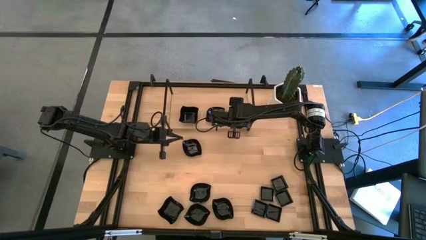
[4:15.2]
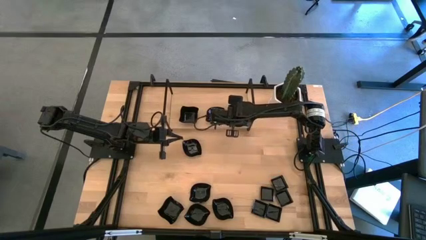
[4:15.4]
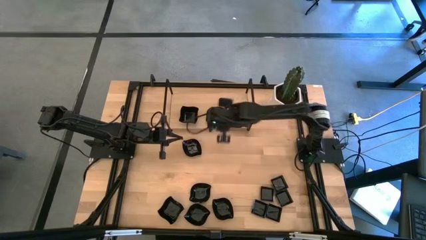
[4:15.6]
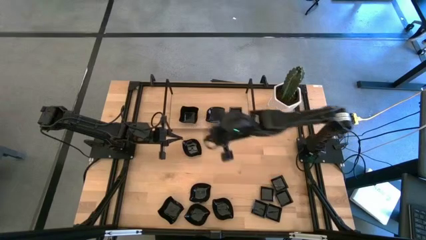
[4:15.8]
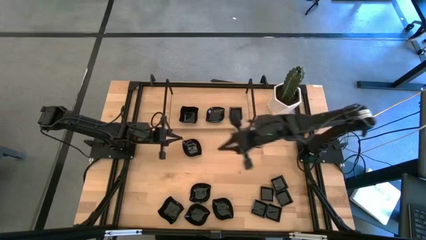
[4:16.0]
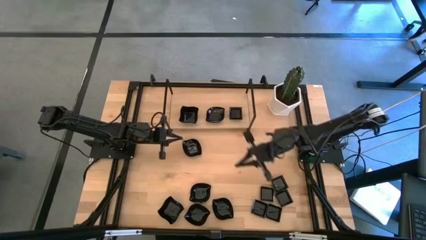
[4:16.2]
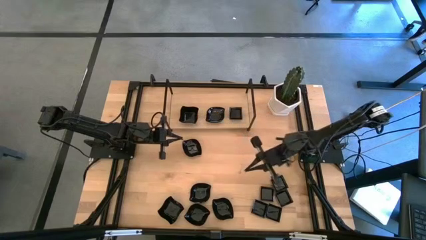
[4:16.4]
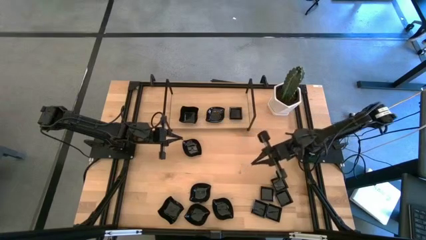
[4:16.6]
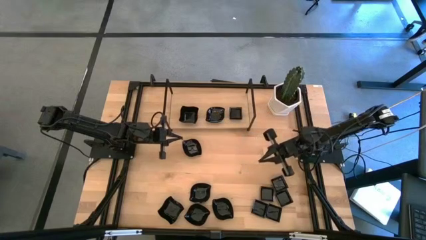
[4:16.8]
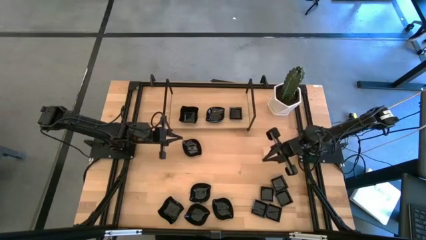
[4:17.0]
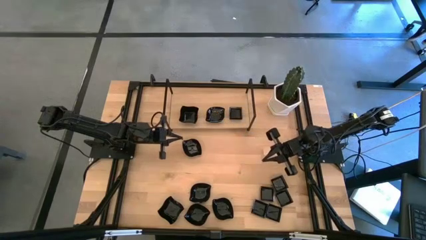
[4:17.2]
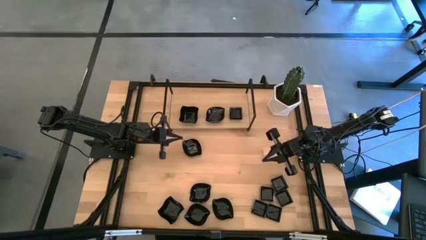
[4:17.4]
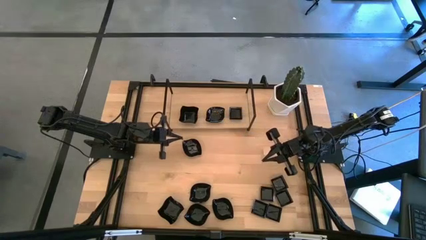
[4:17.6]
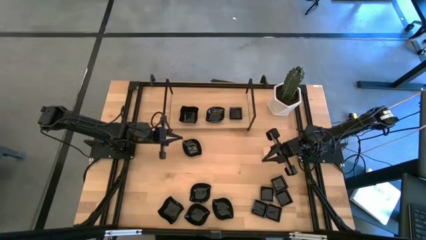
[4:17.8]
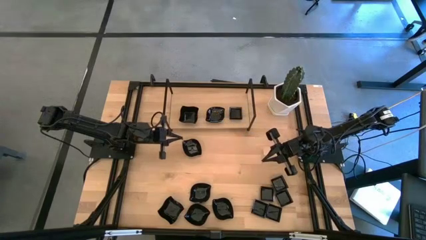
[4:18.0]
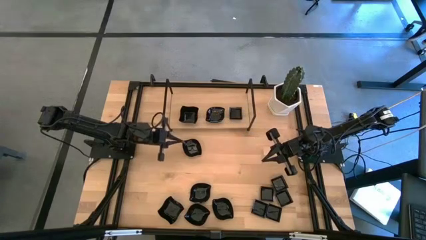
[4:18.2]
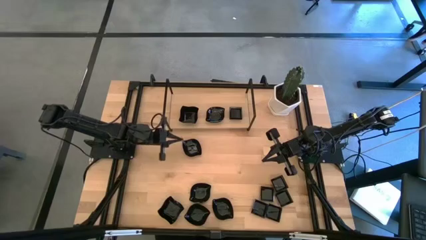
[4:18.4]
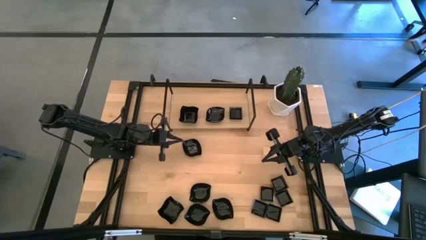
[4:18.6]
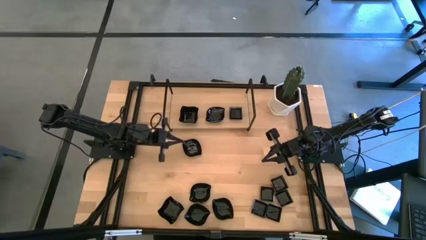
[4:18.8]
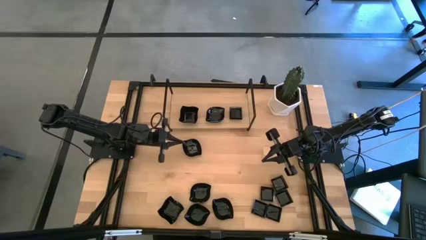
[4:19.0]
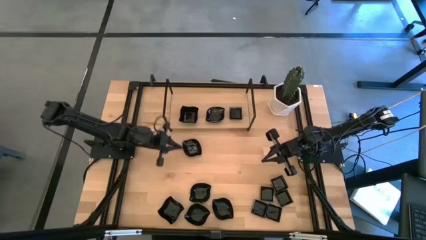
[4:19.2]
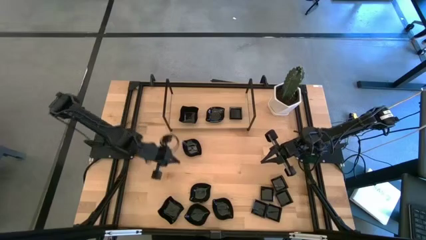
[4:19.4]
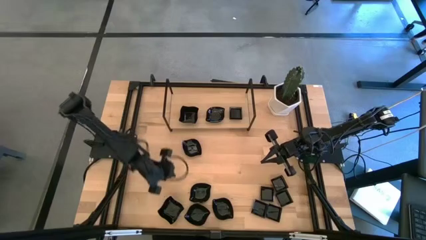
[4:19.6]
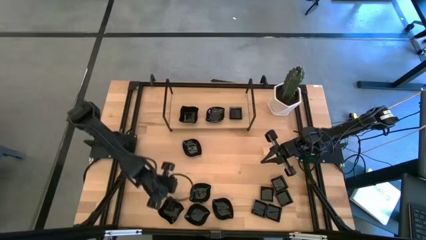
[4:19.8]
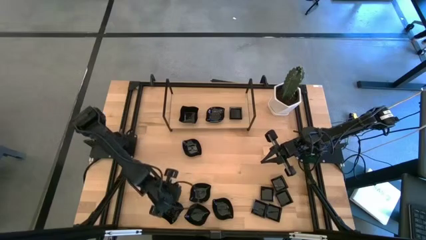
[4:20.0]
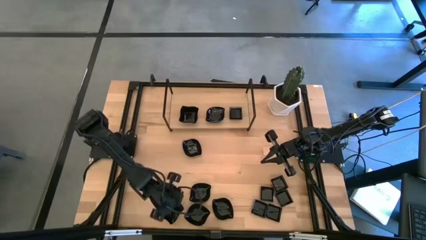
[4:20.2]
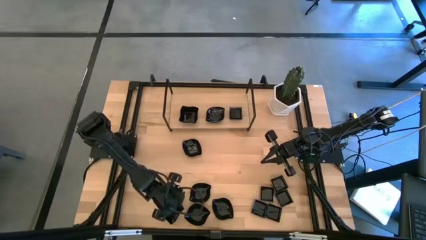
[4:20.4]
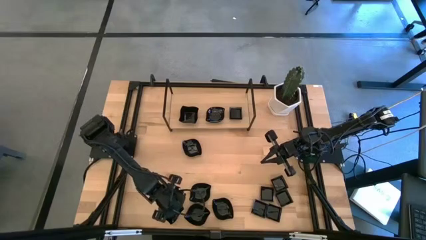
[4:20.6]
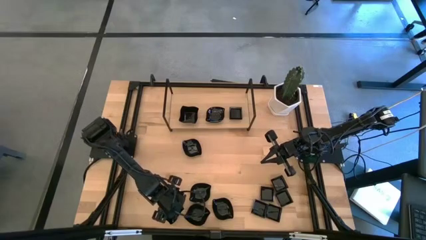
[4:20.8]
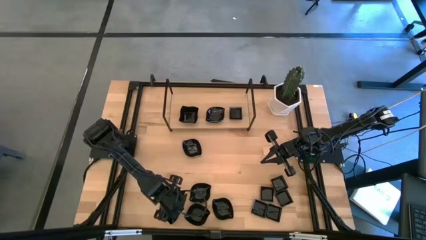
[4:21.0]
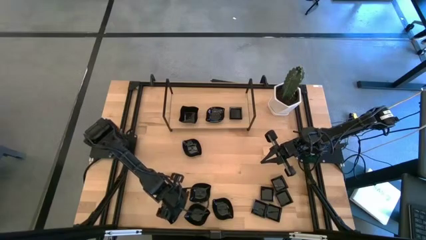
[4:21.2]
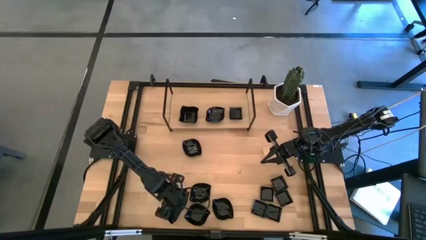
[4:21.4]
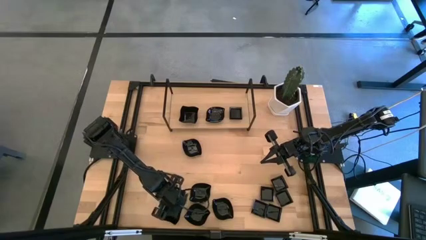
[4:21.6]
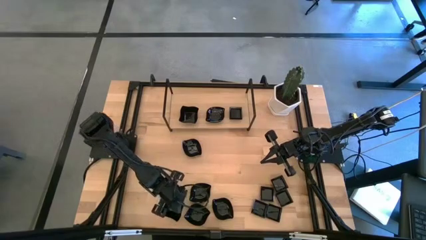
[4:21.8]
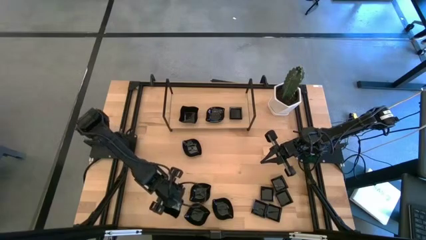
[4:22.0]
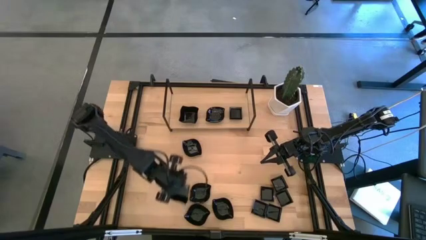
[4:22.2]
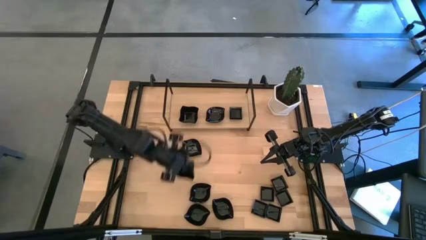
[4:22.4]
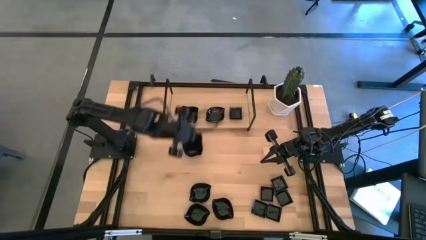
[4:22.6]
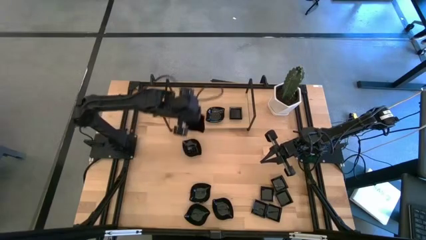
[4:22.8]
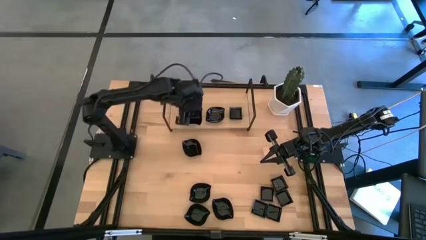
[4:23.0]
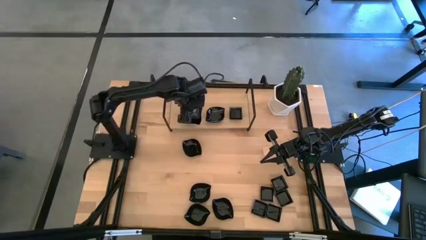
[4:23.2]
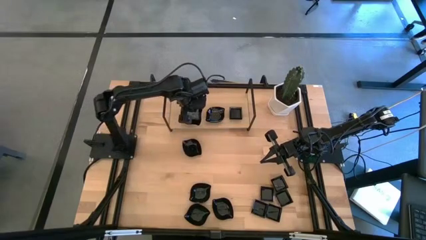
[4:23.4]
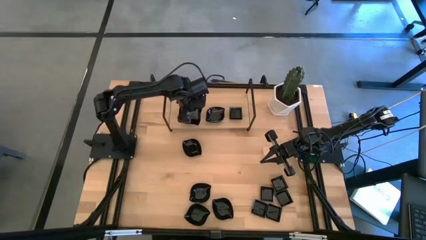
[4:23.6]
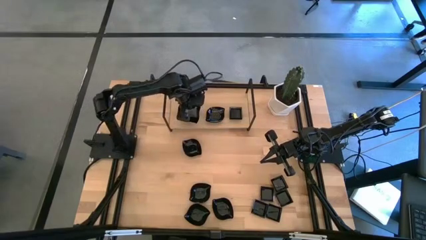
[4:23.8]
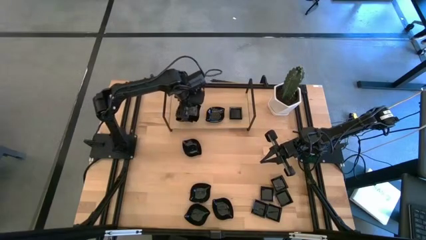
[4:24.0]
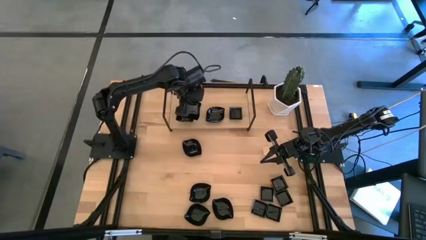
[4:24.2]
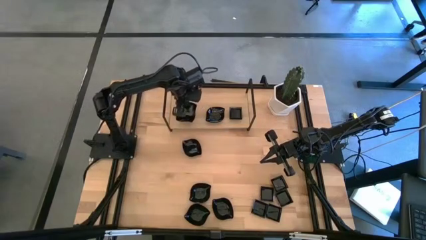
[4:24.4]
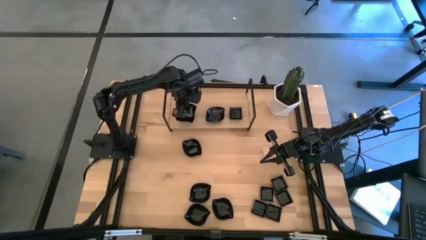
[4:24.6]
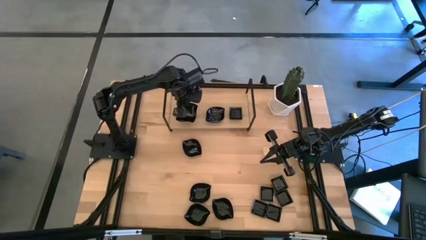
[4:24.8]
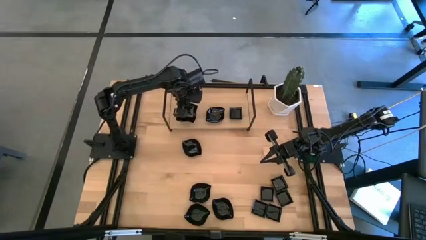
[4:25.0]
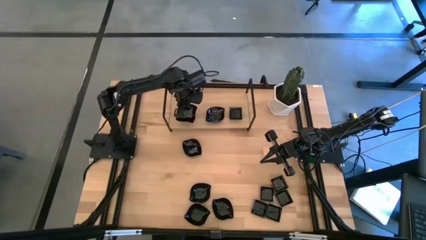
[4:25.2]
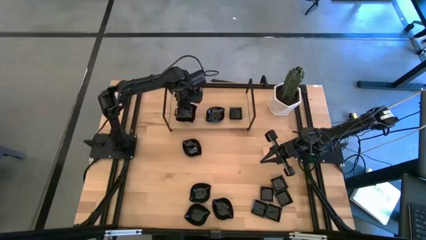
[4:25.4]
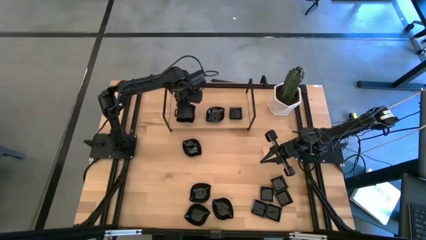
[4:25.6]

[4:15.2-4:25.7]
Task: Pick & Place Mini shaped plates
Stack the distorted square plate on the top of the distorted square plate on the shelf

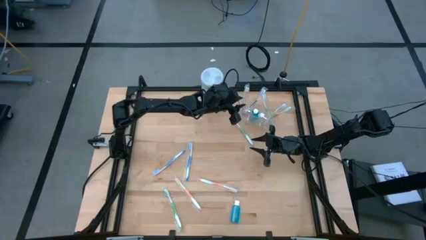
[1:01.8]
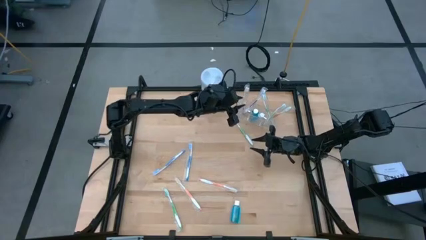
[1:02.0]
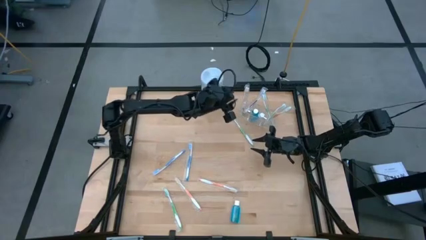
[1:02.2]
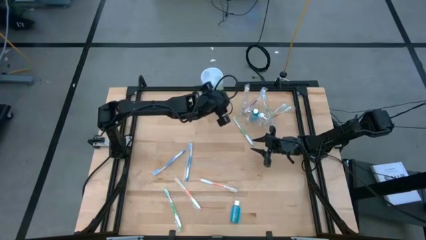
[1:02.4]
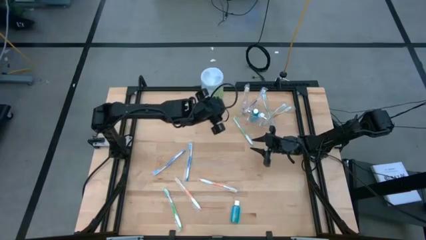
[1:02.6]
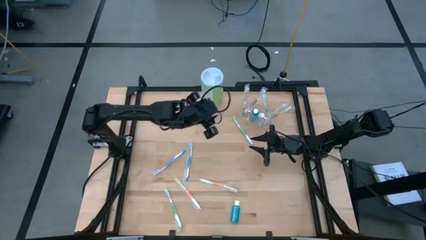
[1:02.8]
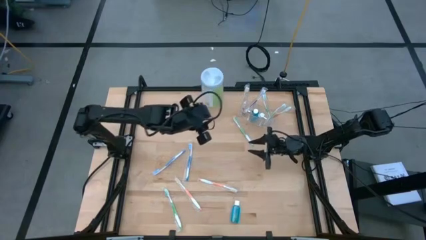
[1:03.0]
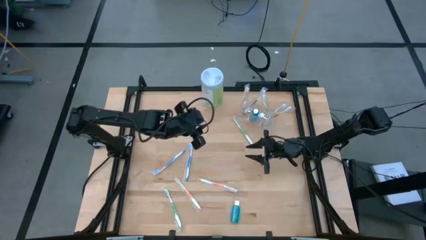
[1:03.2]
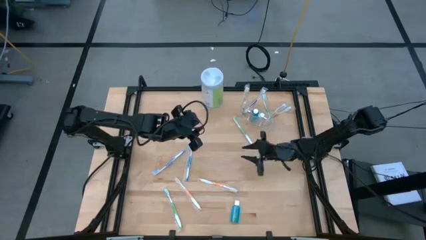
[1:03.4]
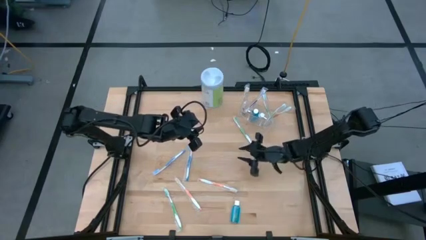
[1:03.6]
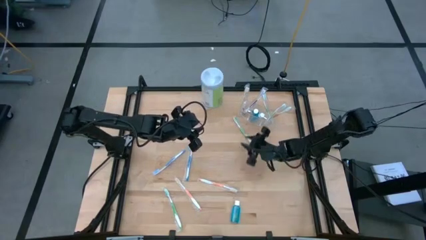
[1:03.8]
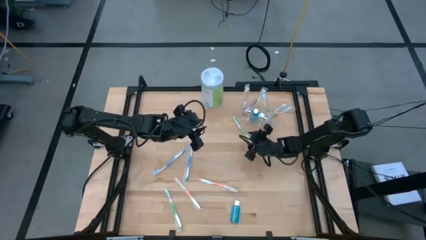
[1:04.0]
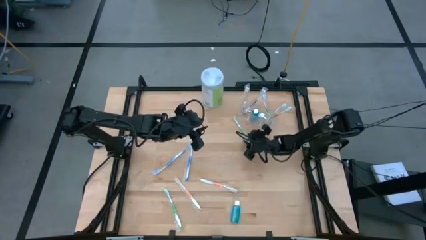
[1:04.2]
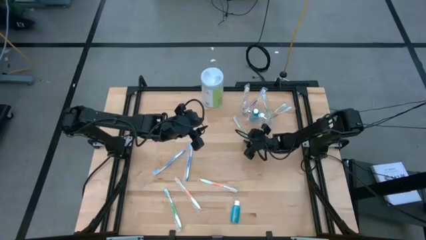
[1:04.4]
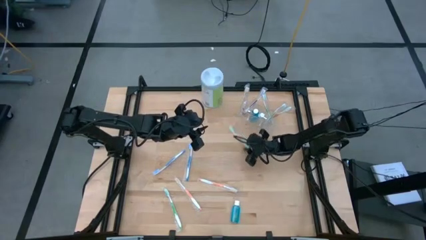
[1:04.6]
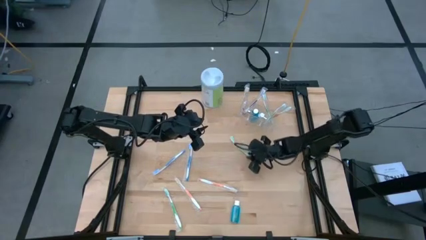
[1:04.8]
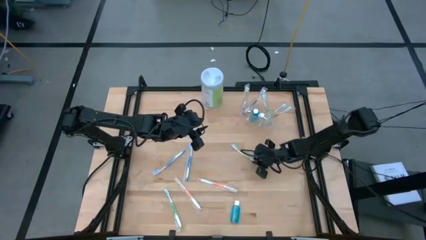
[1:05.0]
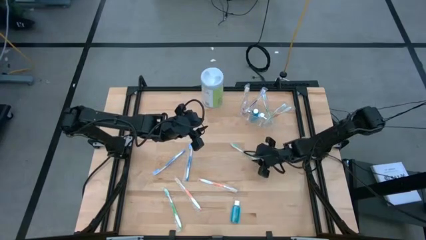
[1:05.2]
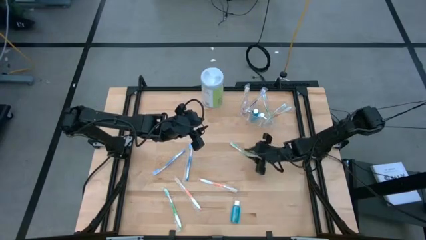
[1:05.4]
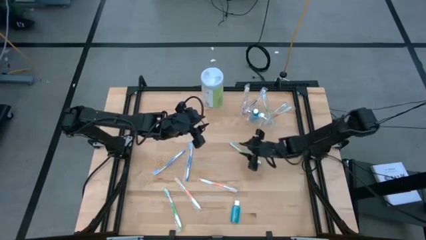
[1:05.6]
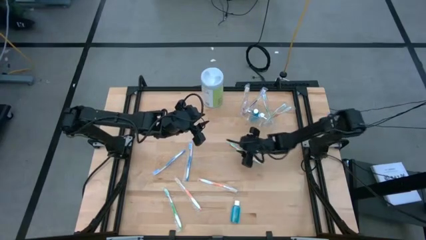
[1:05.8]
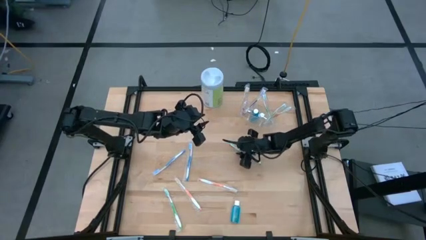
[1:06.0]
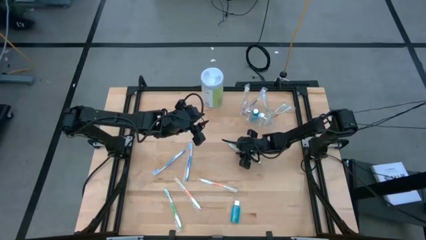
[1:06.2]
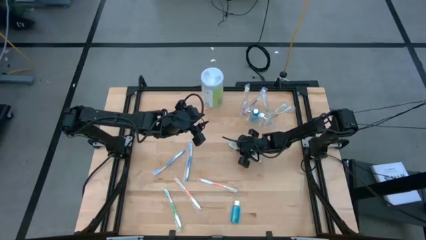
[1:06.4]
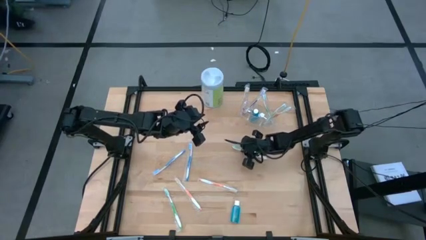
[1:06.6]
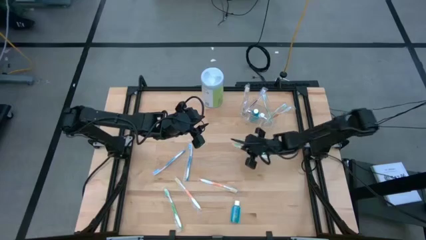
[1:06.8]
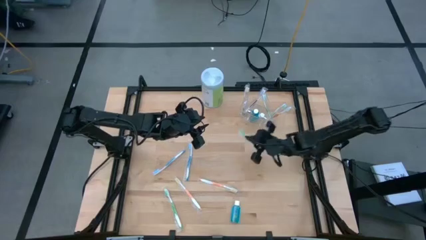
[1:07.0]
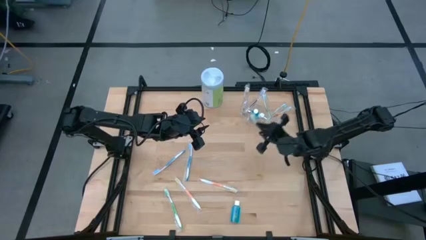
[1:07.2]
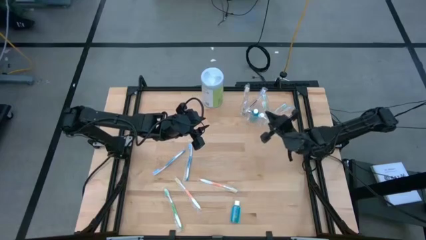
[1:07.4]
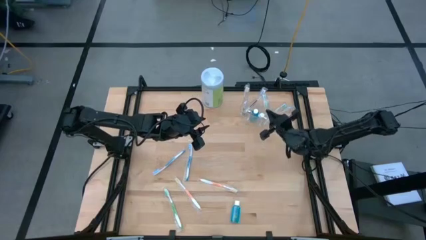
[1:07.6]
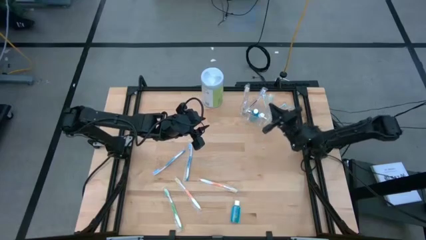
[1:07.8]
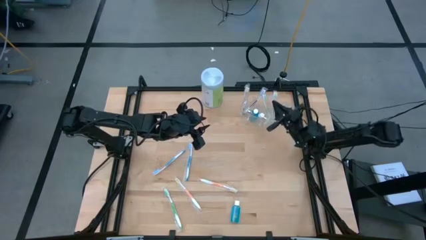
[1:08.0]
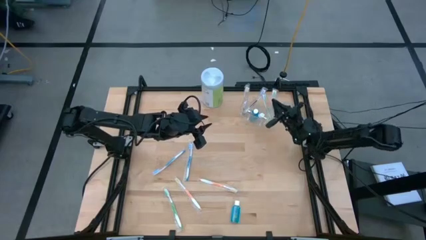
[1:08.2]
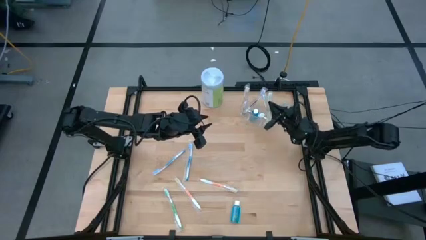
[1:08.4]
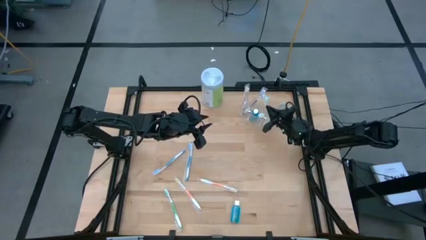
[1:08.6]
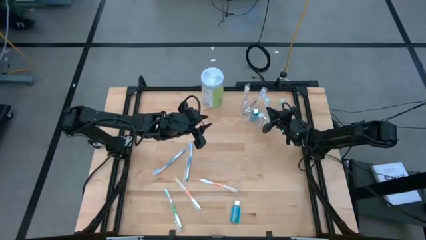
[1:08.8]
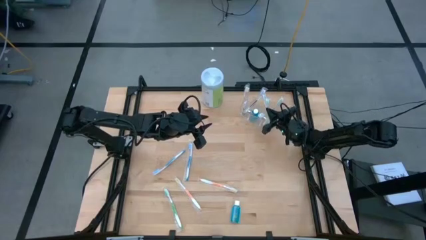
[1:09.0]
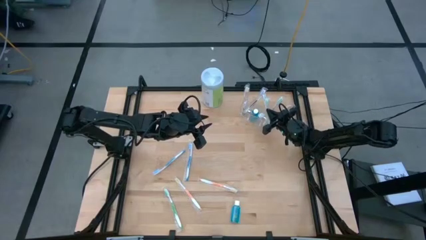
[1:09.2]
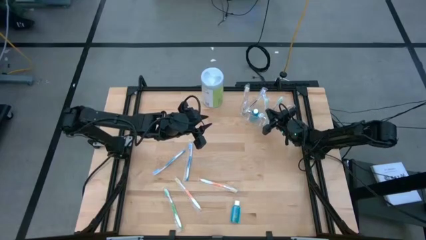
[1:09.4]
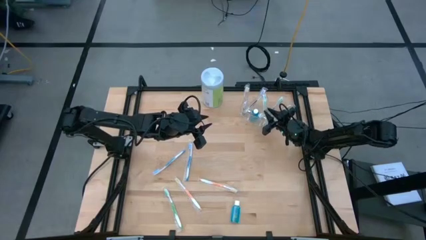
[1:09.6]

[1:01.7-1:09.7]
Task: Pick & Place toothbrushing station
Put the green toothbrush into the transparent organizer
